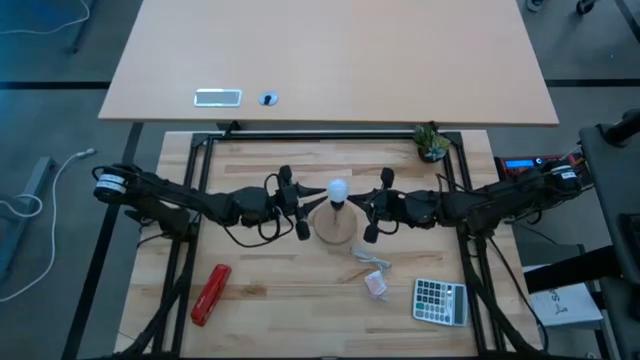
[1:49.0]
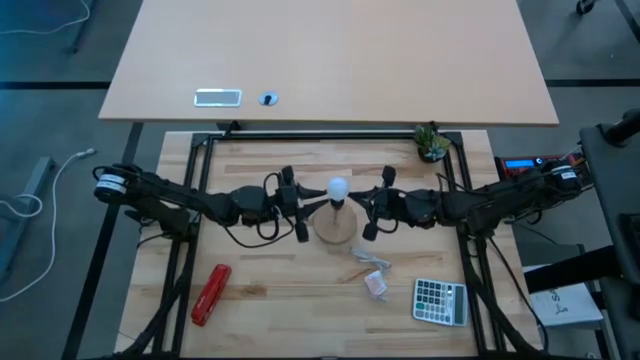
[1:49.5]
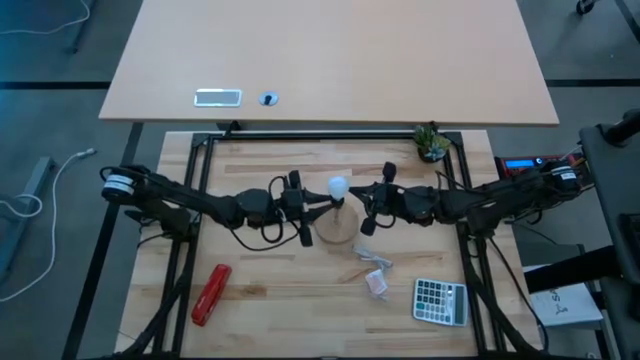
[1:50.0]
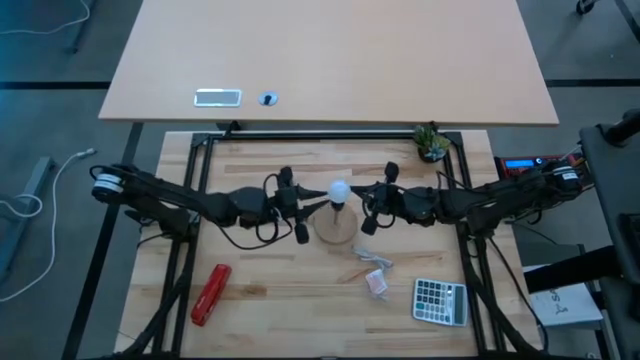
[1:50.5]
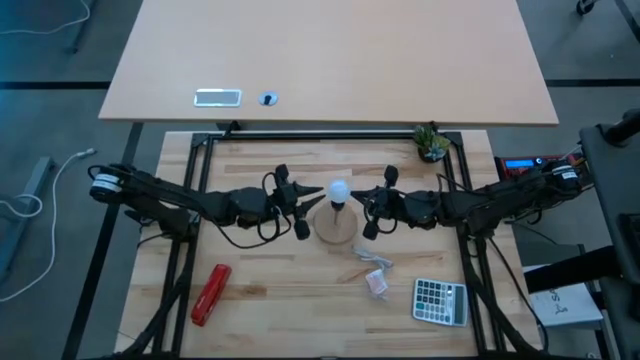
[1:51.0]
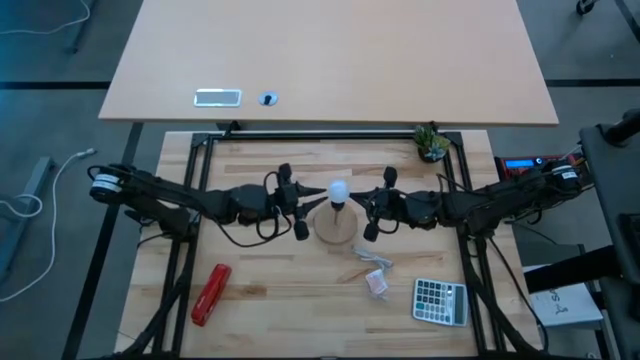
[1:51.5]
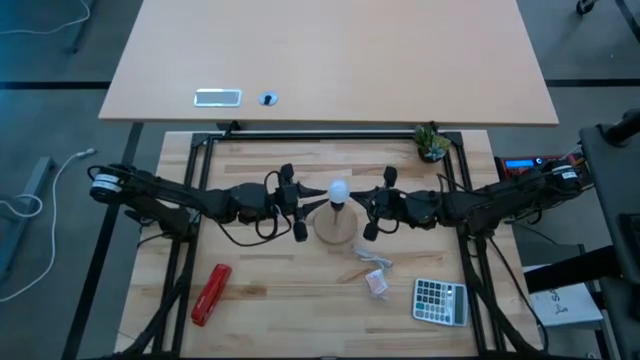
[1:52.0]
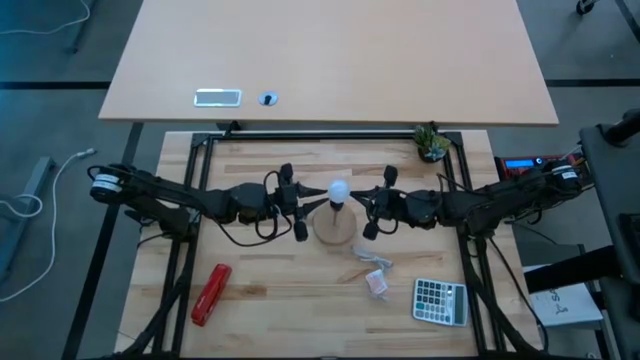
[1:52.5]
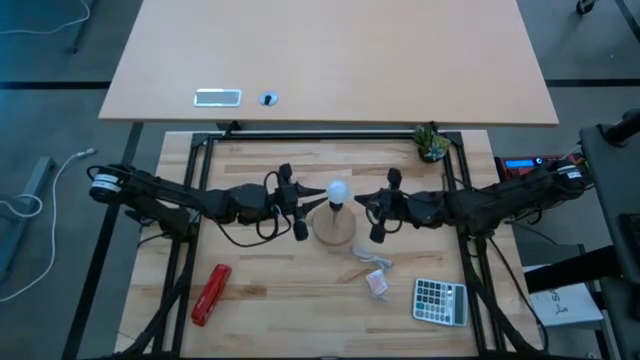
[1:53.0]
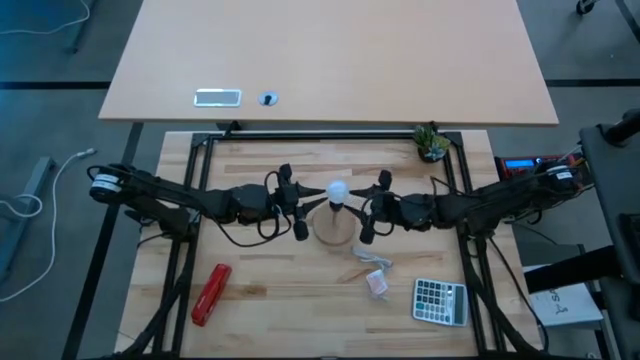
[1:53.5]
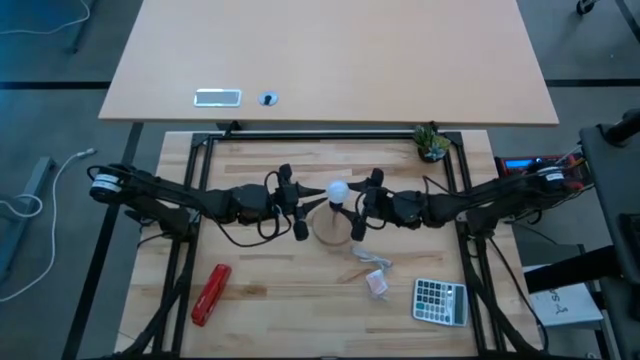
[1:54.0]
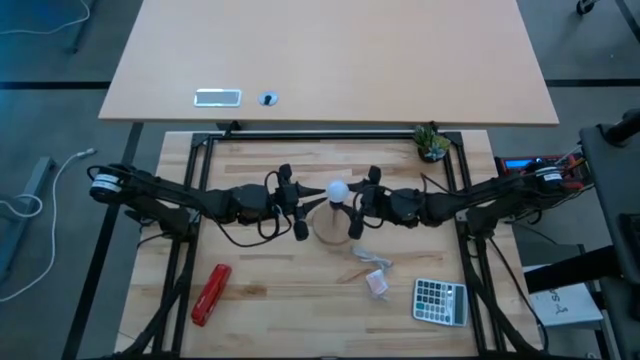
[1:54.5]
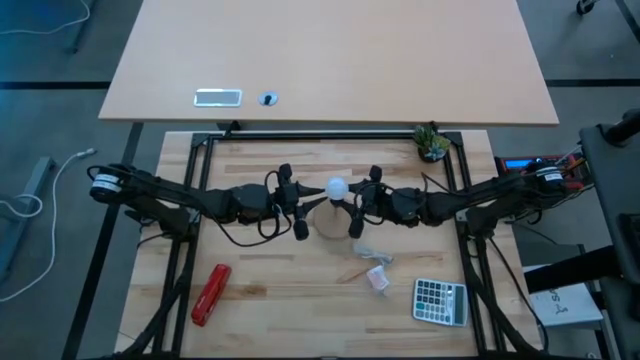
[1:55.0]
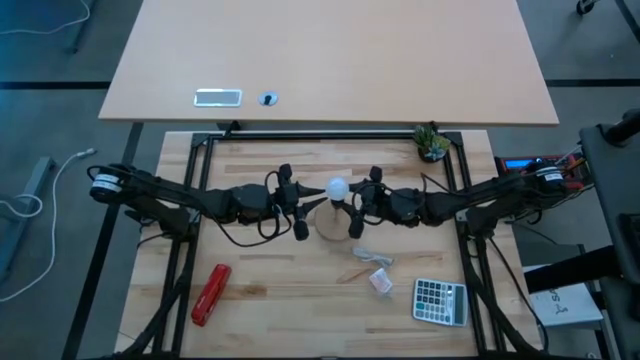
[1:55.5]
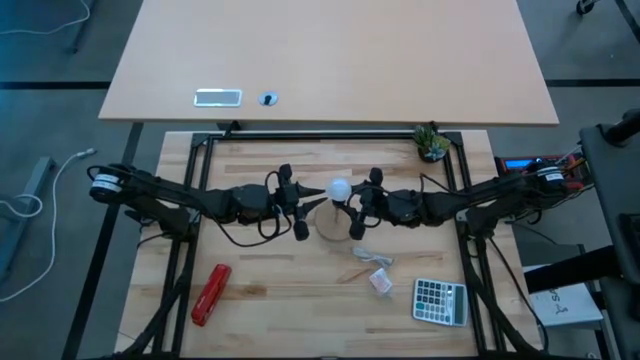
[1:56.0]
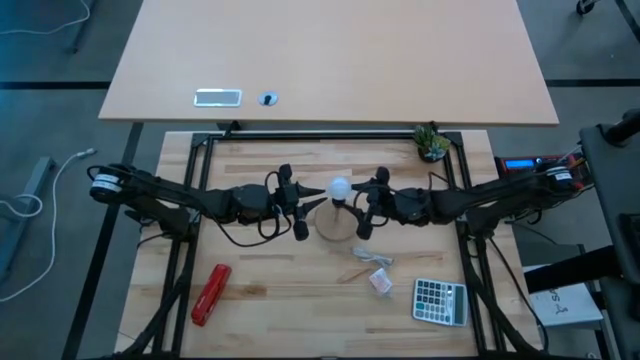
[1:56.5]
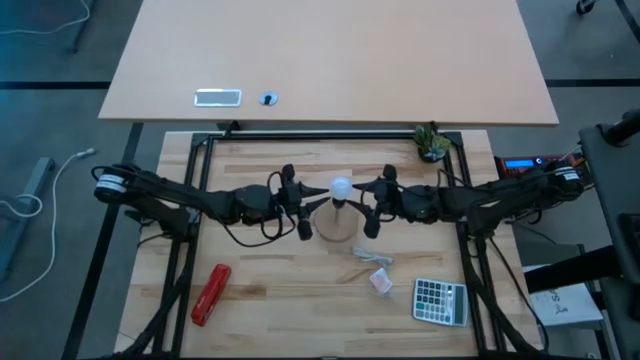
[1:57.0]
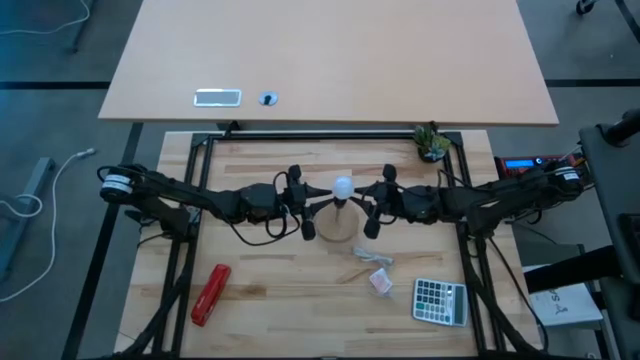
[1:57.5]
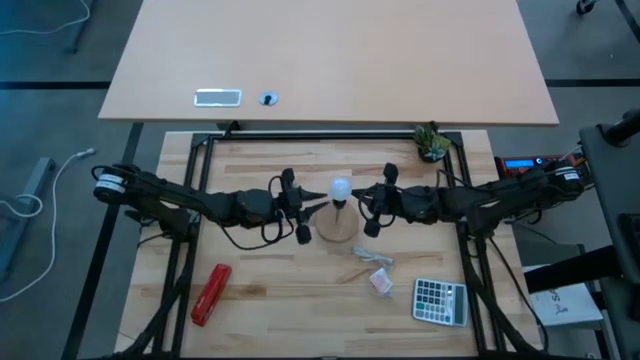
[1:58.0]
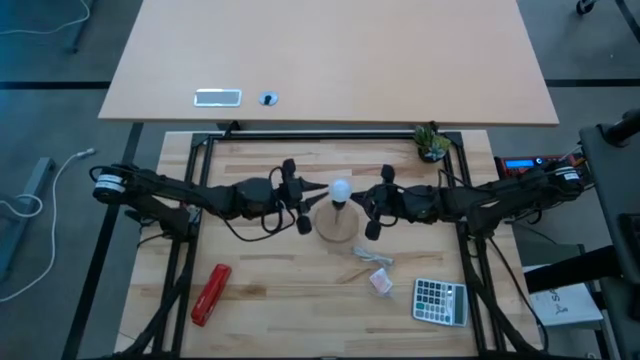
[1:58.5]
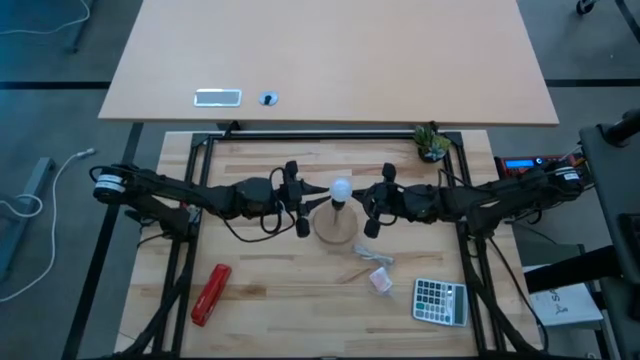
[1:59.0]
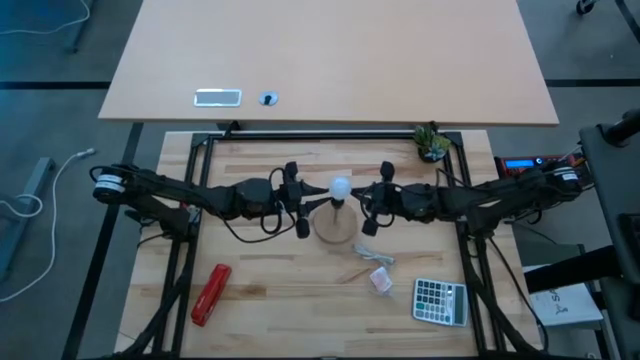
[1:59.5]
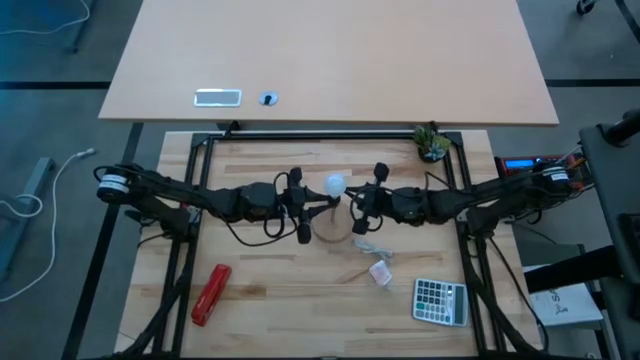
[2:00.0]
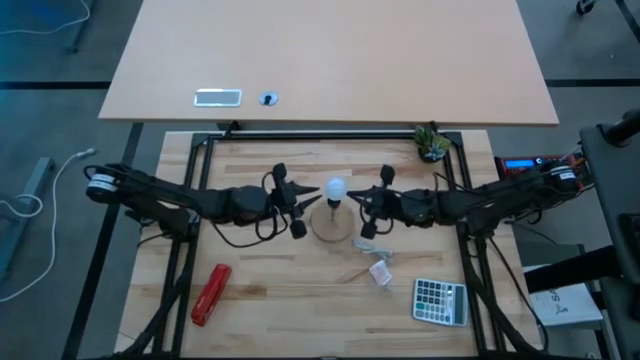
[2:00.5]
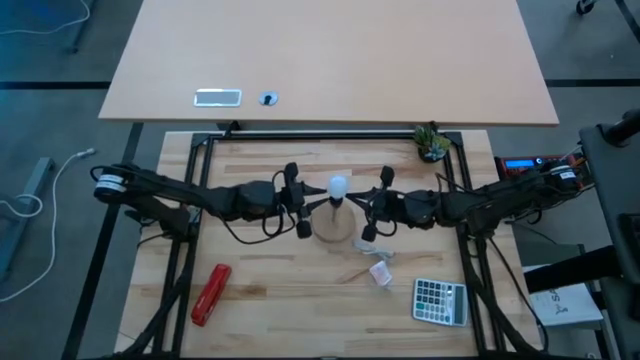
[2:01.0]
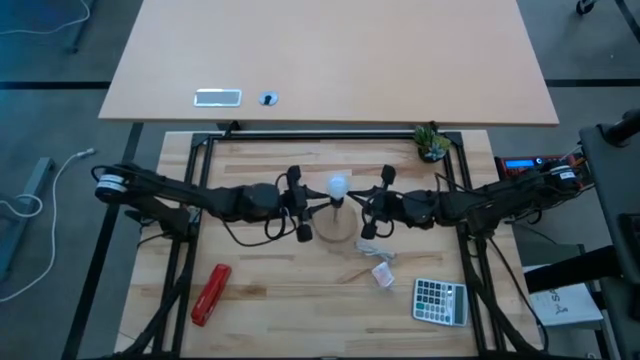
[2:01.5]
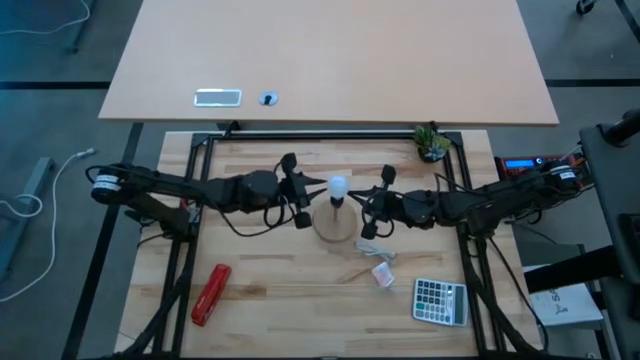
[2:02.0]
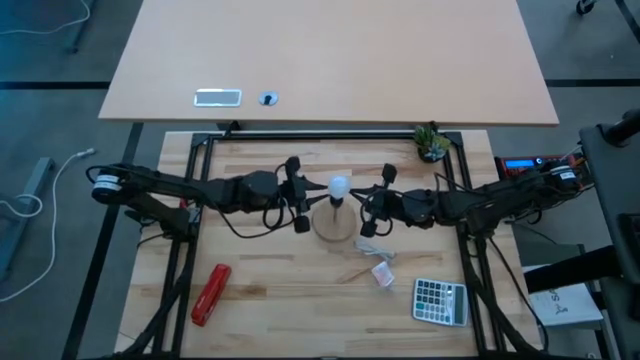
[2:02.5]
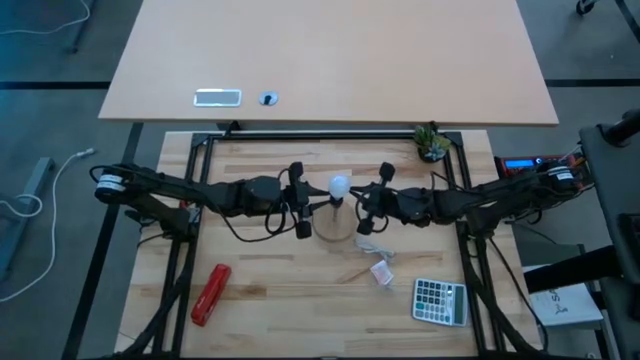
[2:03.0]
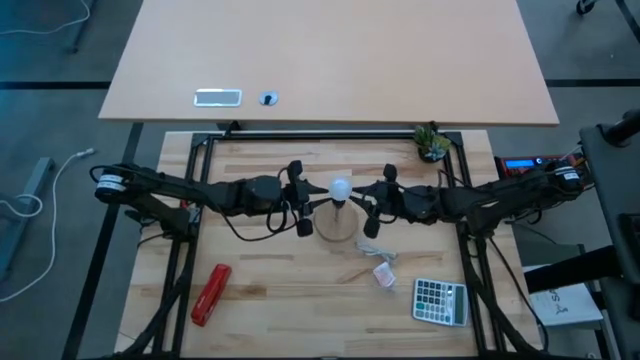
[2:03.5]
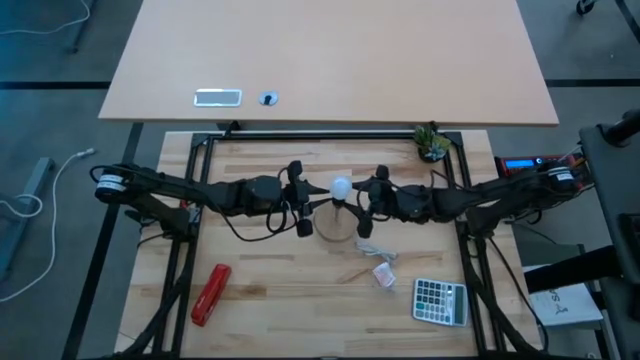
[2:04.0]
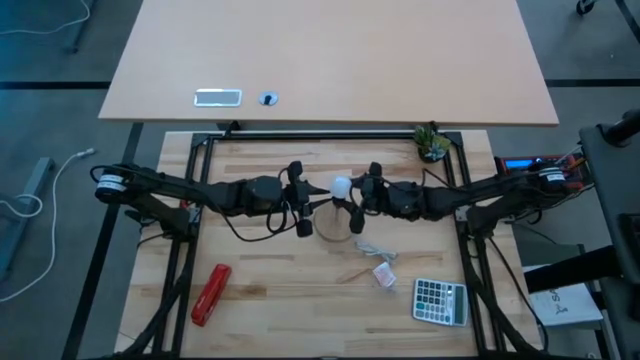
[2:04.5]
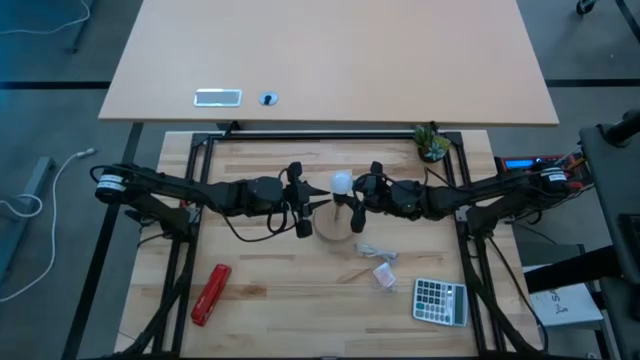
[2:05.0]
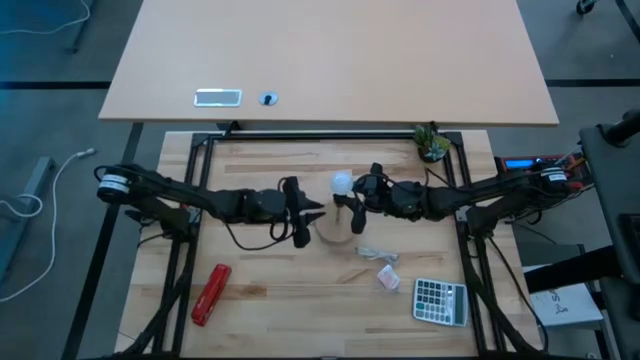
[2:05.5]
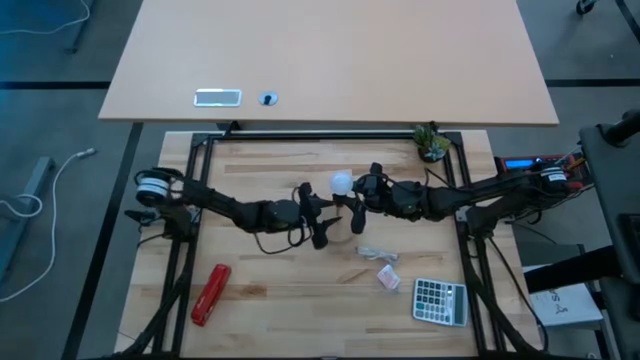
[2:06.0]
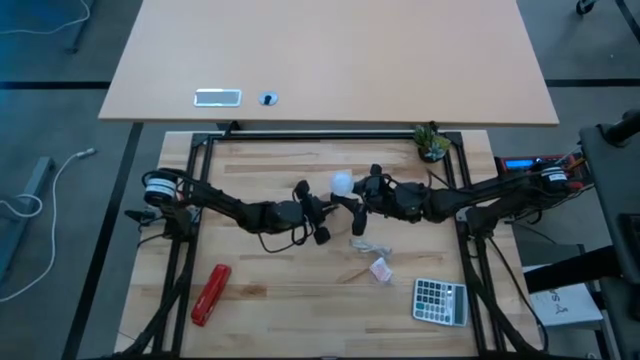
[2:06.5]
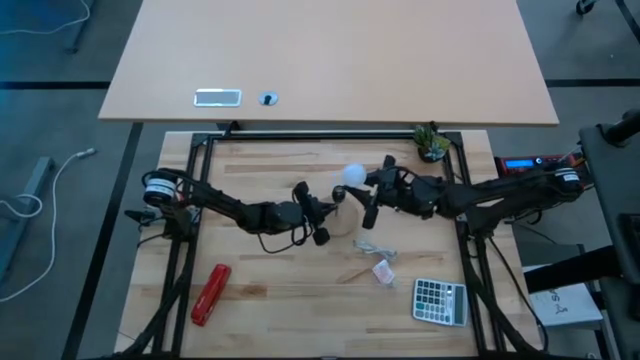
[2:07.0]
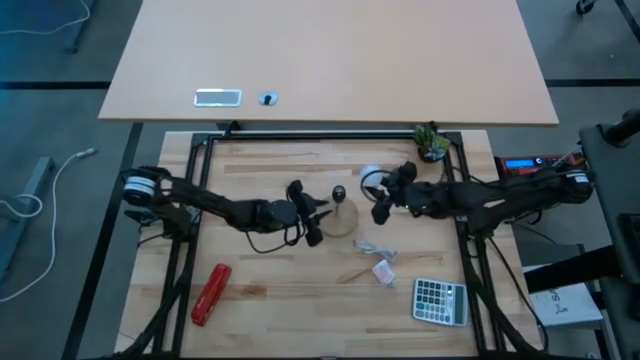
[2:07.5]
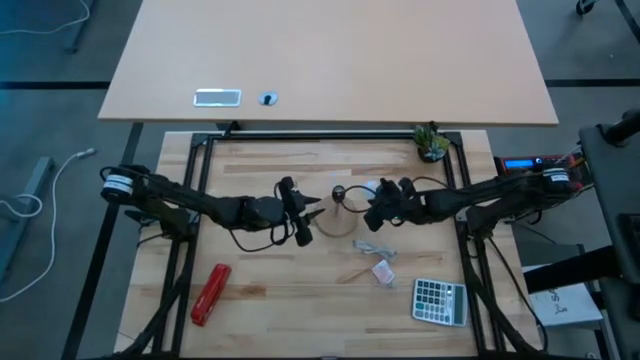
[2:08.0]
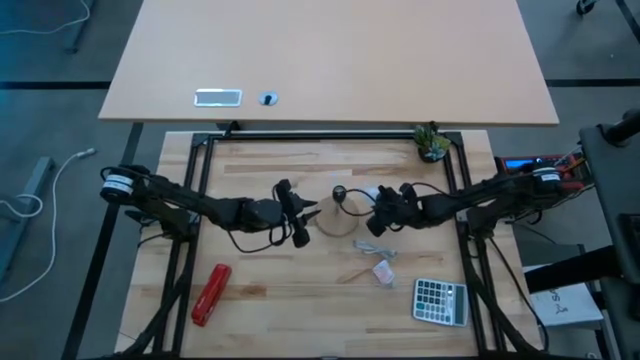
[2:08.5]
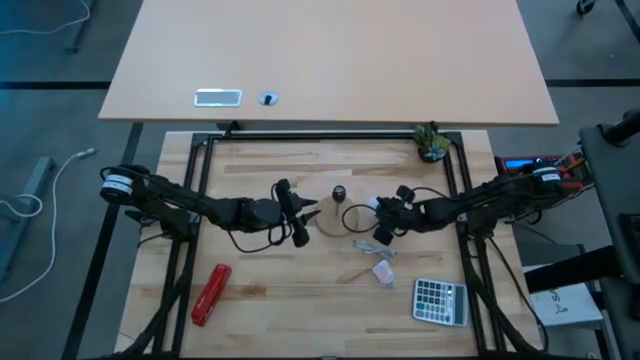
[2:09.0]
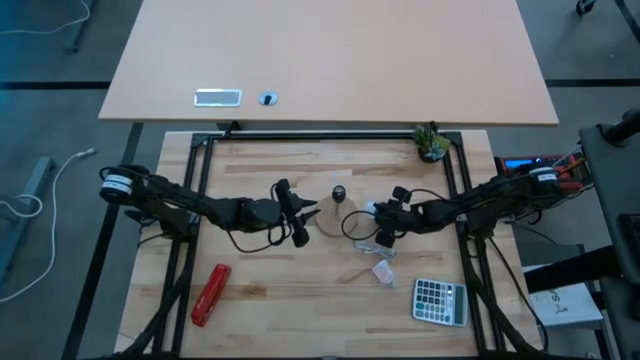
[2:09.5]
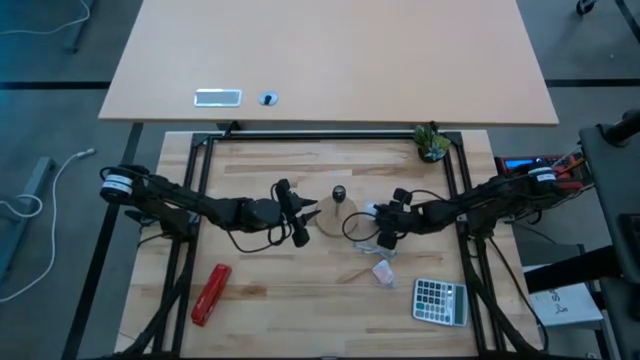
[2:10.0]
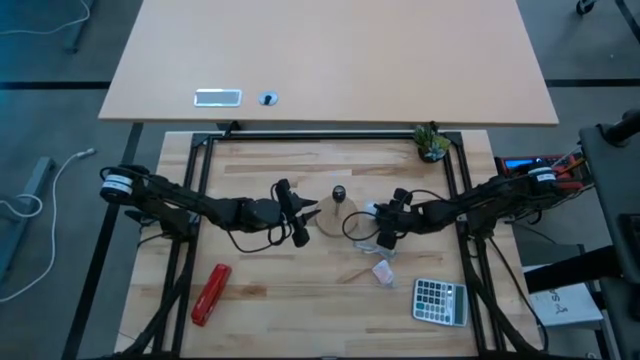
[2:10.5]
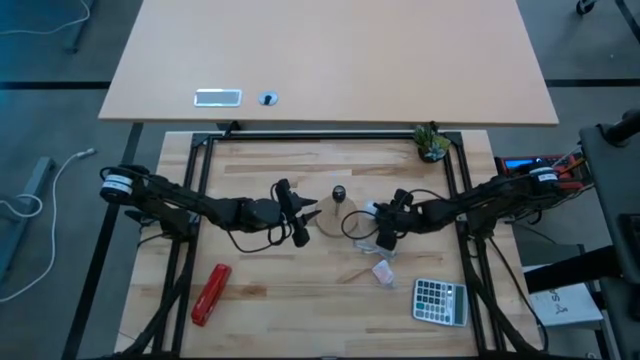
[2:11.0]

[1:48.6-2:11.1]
Task: Screw lightbulb
Remove the lightbulb from the lamp
